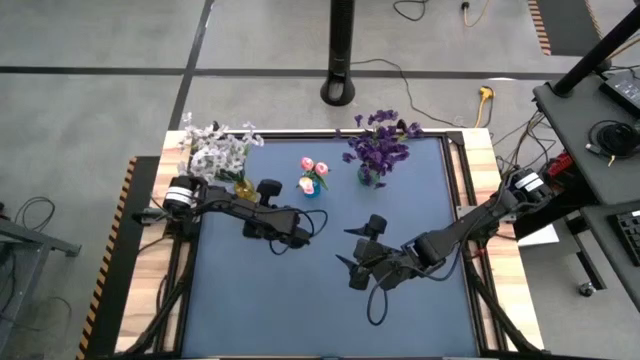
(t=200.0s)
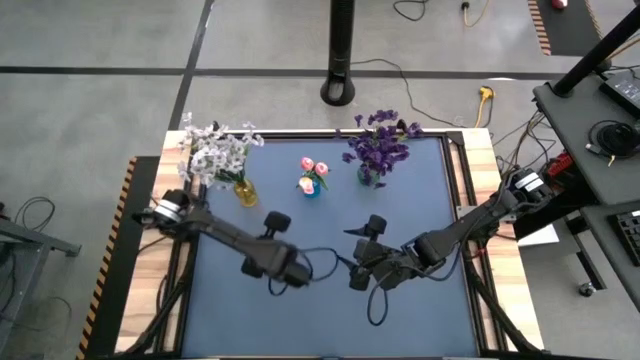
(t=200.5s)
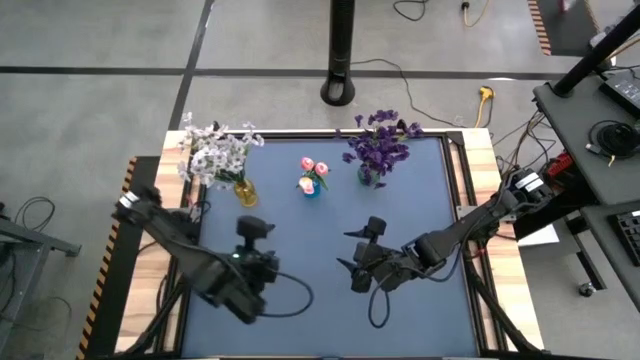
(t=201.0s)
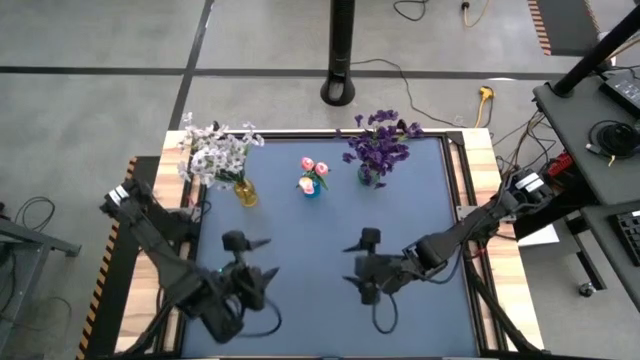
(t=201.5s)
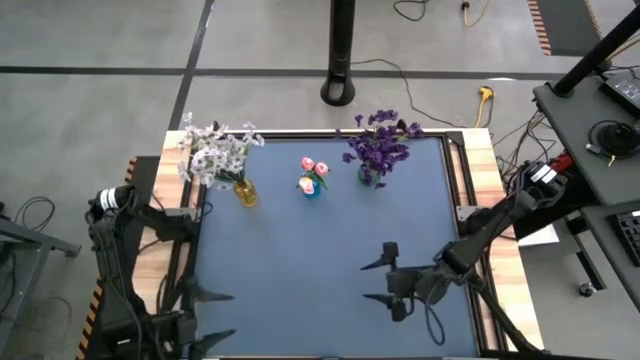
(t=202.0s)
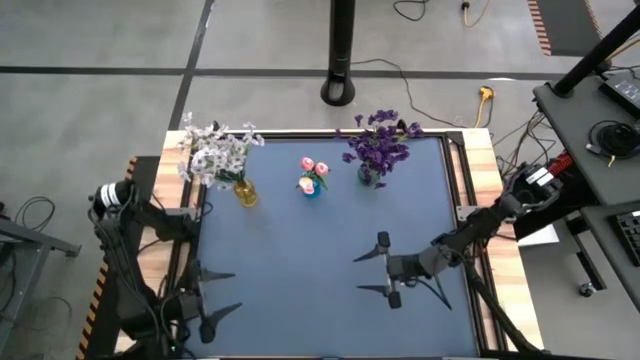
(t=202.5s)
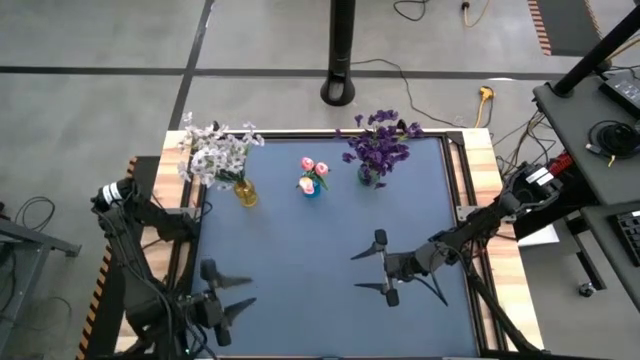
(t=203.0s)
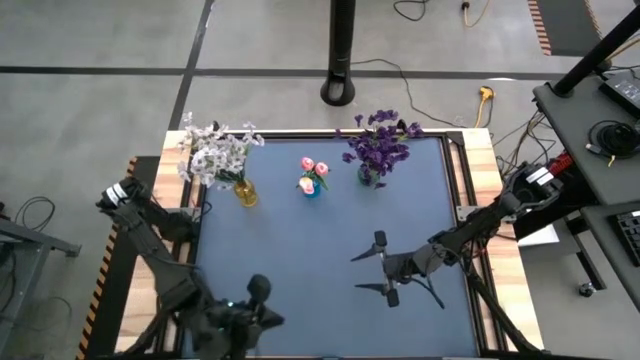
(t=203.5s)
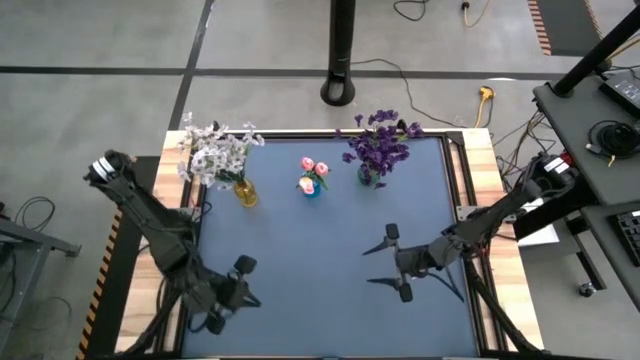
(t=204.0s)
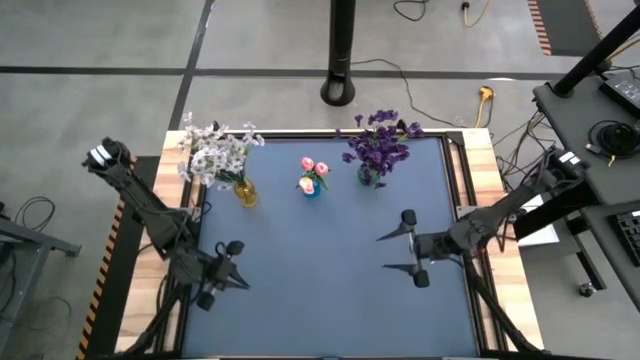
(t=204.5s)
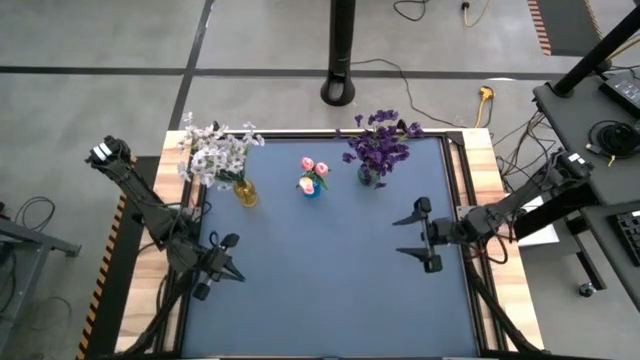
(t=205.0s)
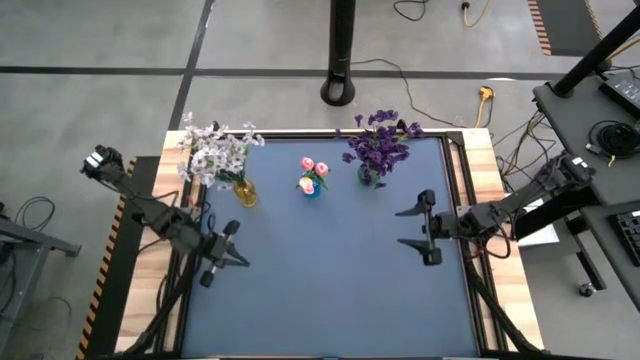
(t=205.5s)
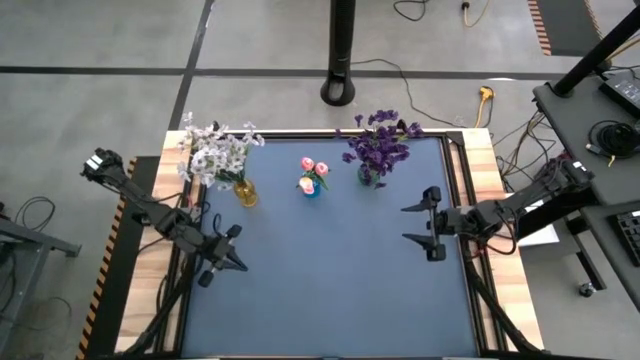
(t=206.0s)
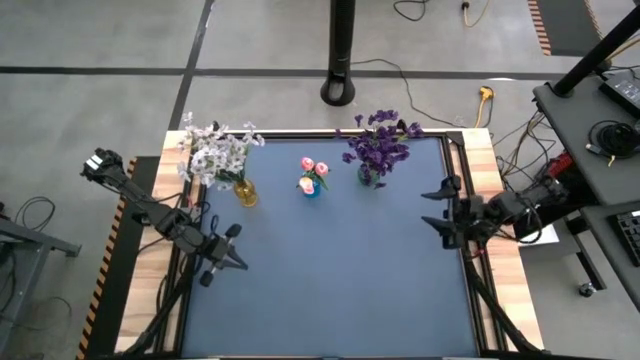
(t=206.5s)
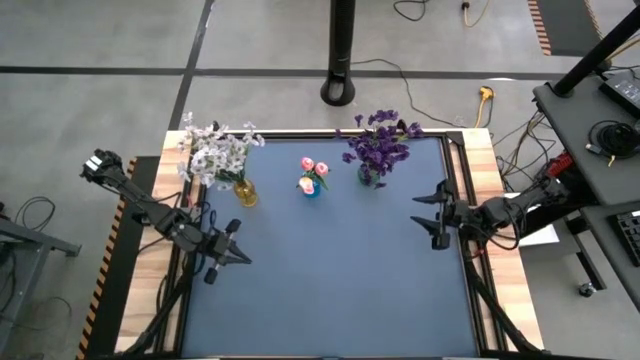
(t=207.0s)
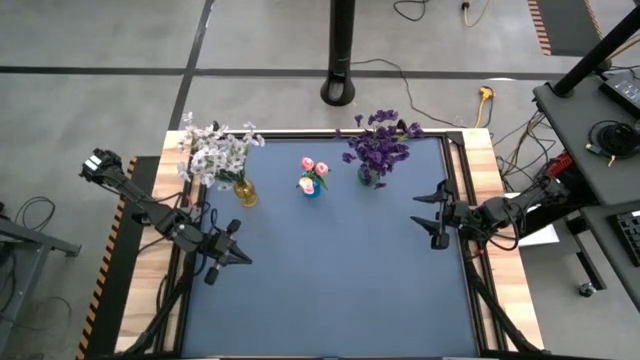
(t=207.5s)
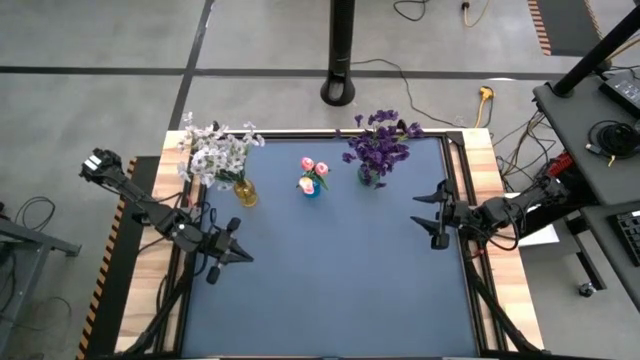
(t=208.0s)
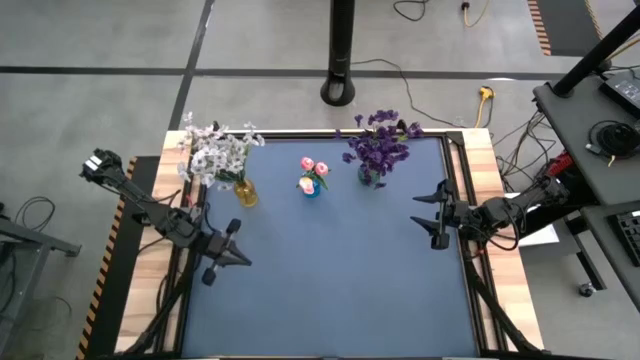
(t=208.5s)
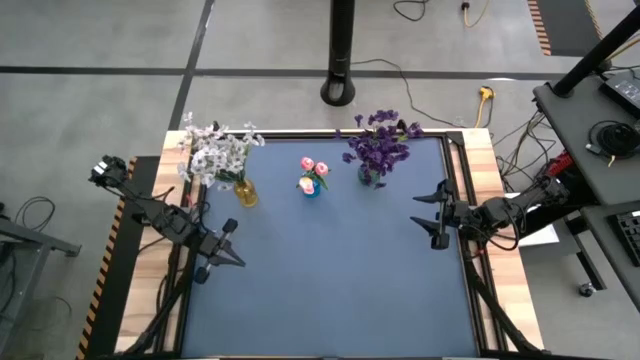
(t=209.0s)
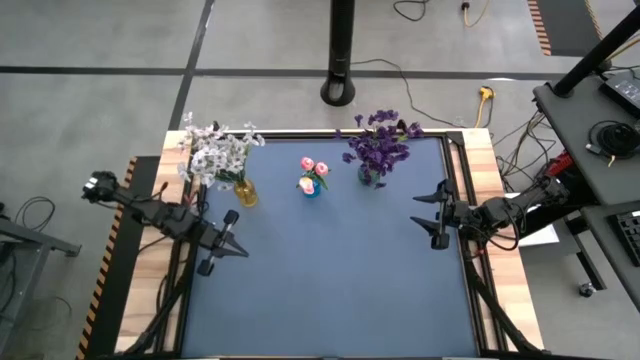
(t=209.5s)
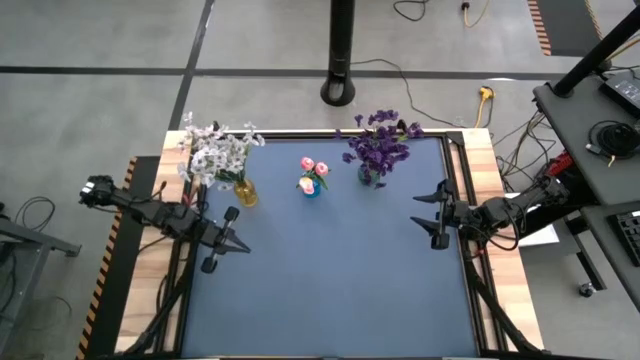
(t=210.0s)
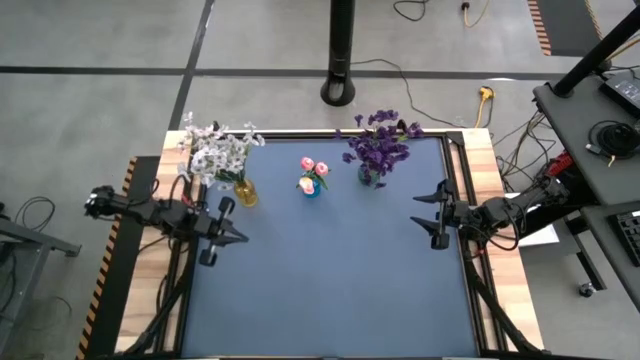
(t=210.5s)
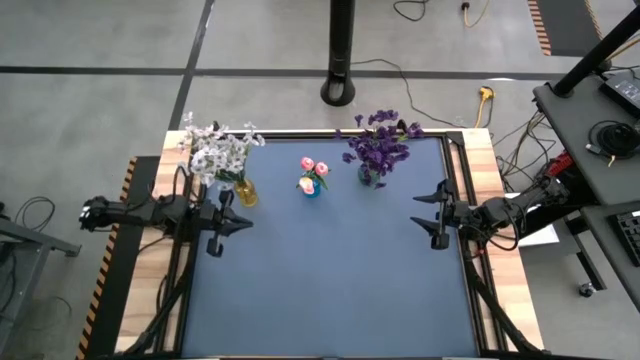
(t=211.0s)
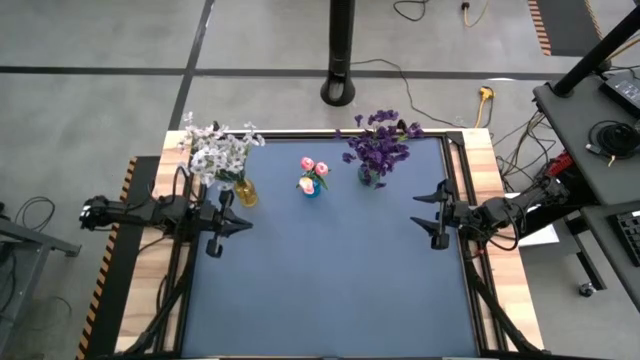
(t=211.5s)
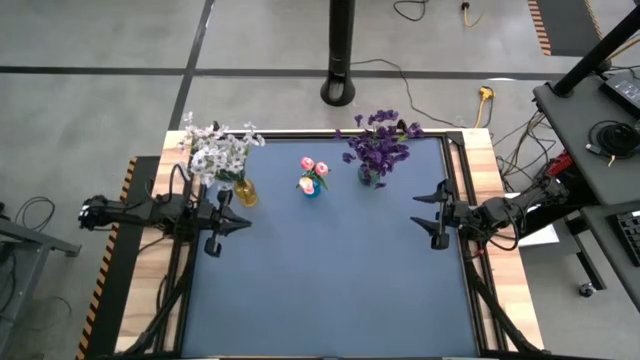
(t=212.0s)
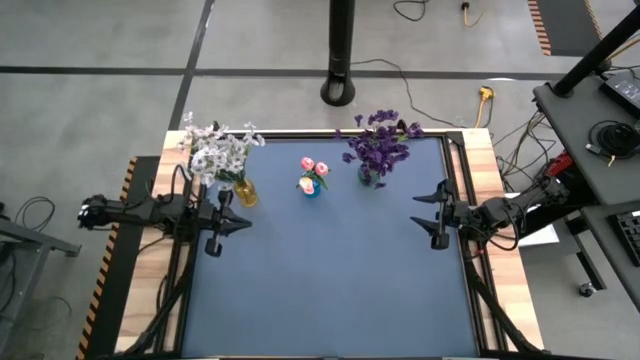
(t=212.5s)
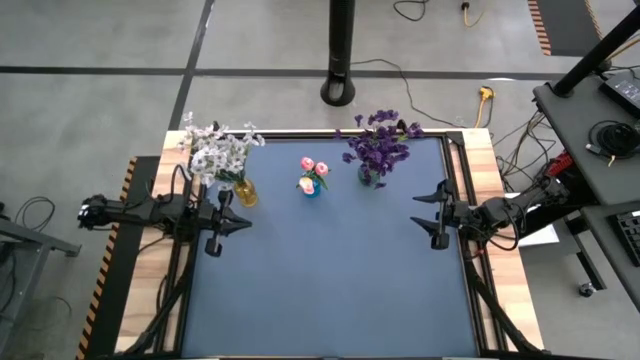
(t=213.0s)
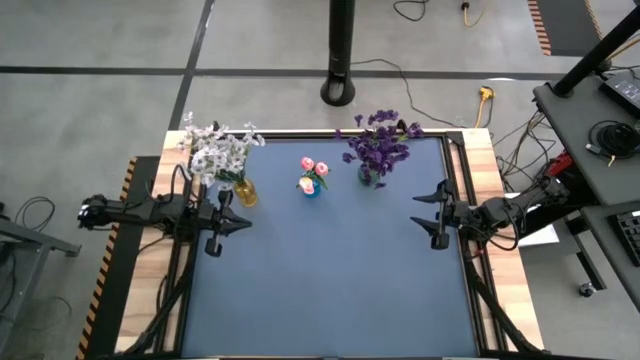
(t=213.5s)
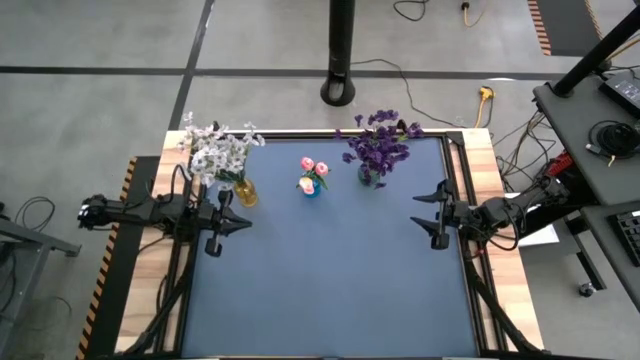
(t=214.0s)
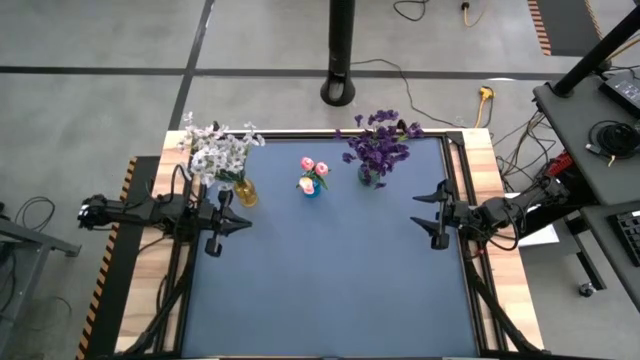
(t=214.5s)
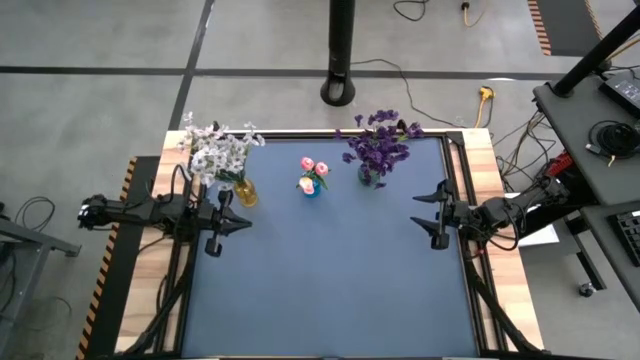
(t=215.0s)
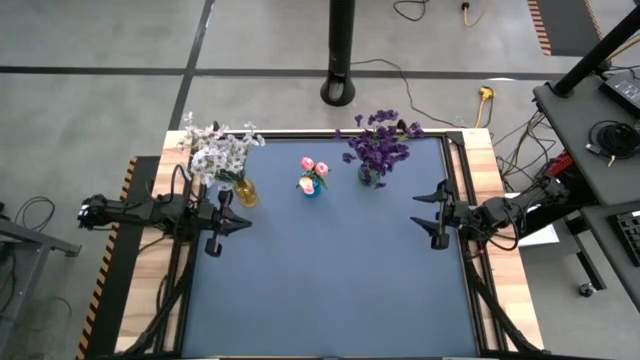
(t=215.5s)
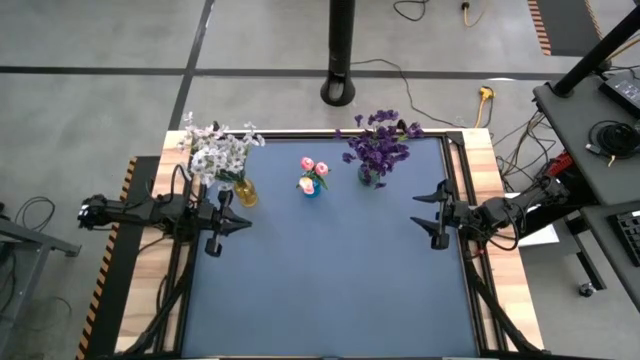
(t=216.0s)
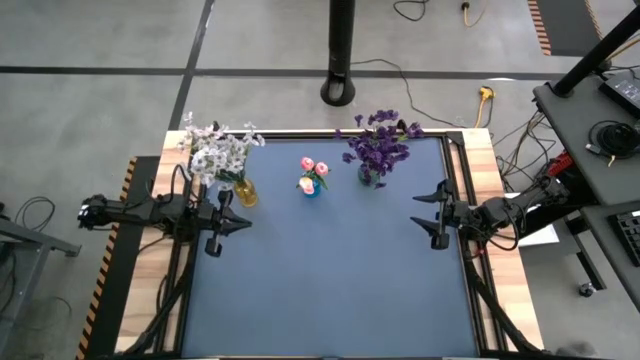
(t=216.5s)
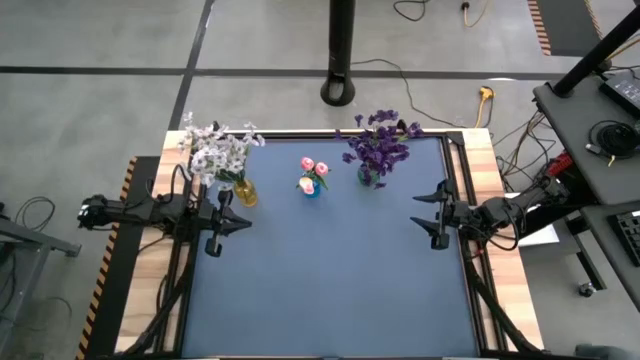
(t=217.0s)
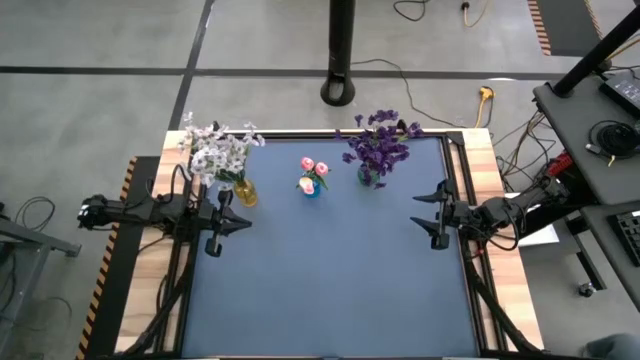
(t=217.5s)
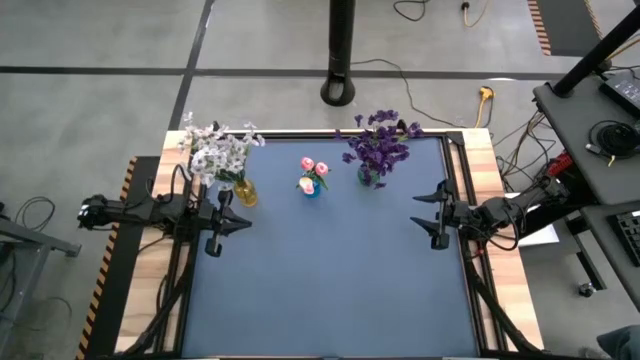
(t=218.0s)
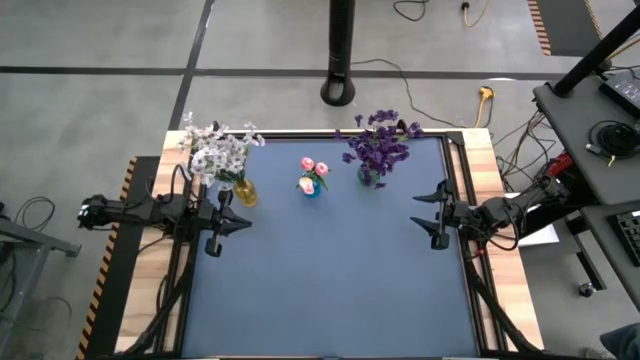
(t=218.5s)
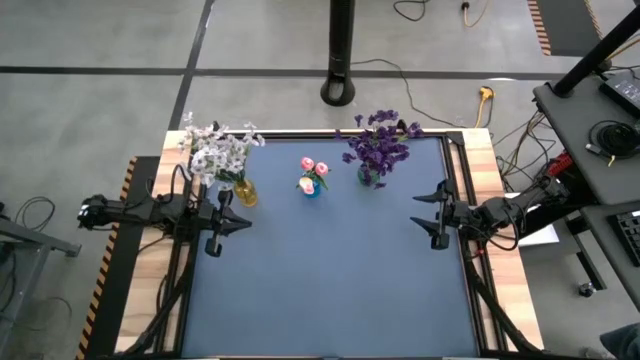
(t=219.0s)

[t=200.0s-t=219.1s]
Task: Sort flowers into vase by color
Return to Home Position

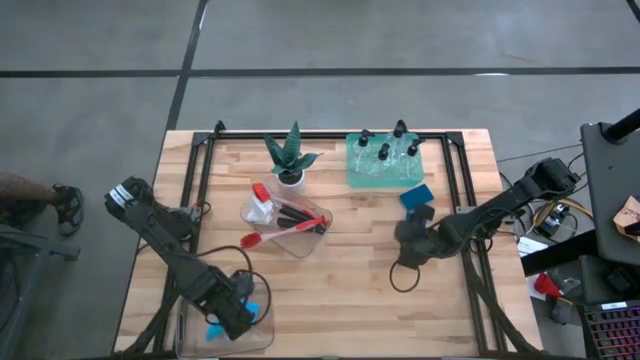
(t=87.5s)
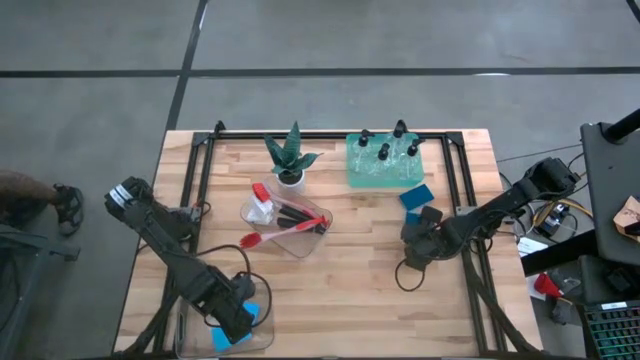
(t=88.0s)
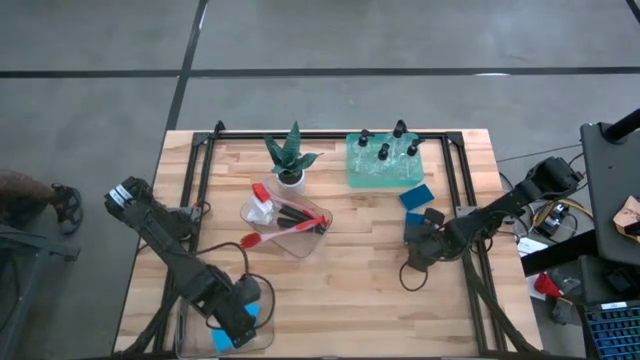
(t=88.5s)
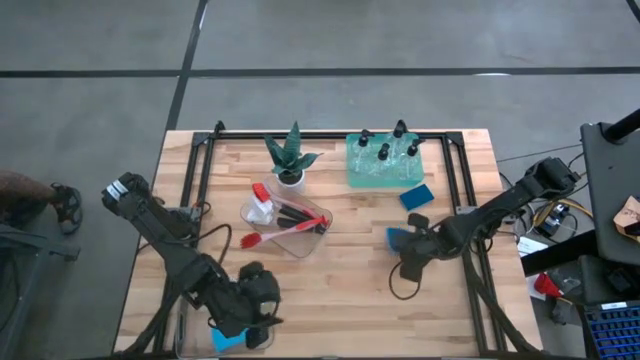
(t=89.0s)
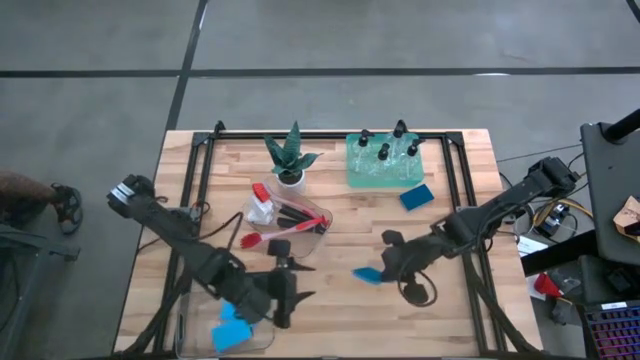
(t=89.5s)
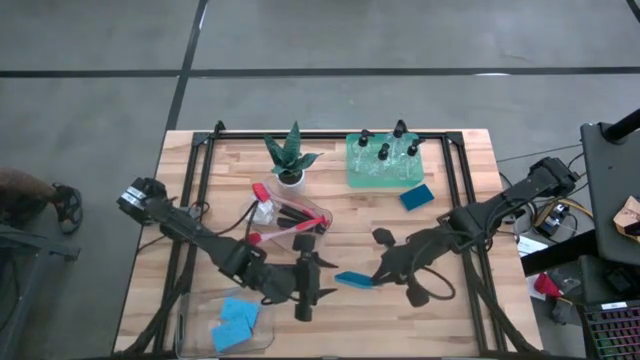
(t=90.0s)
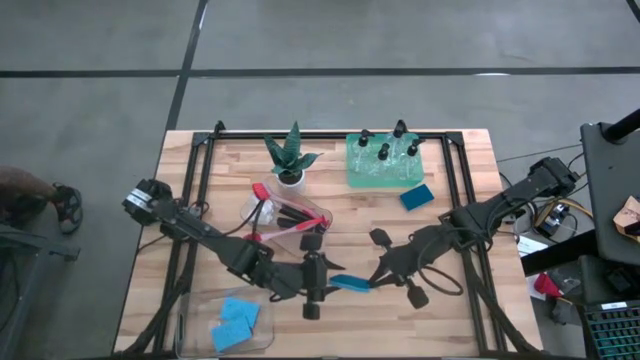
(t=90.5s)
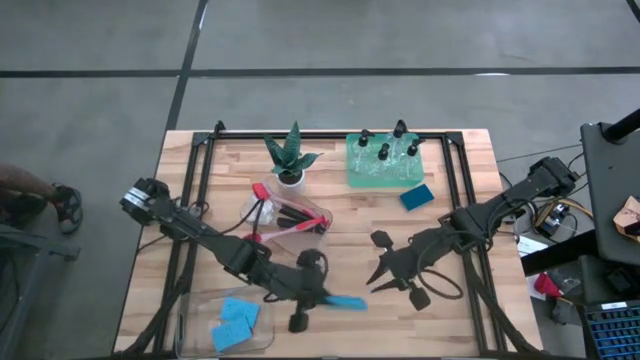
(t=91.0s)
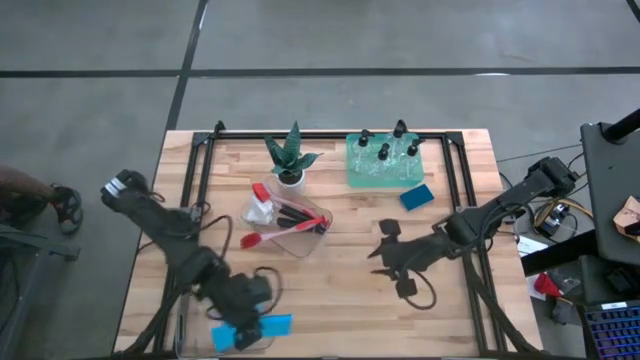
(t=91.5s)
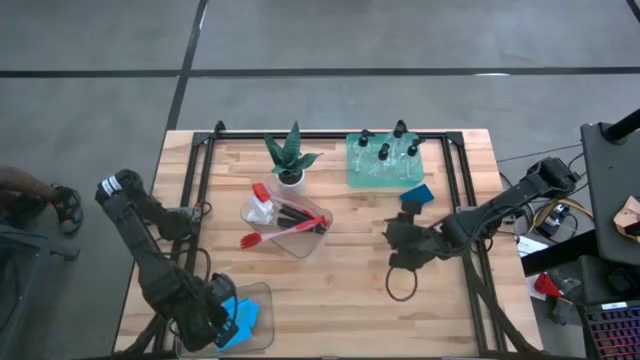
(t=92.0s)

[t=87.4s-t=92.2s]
Task: Pick & Place Kitchen Sink Supplies
Put the blue sponge into the bottom transparent bin
